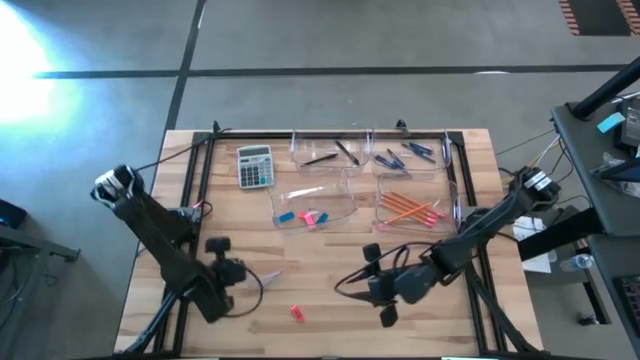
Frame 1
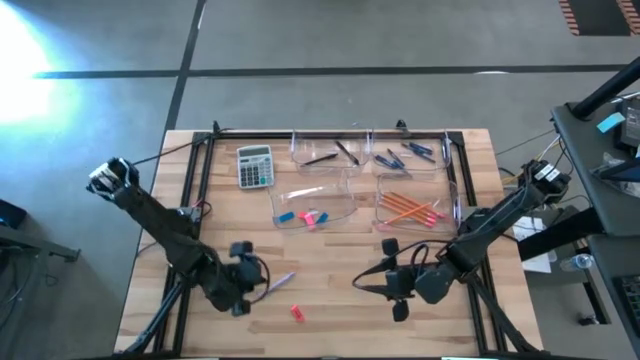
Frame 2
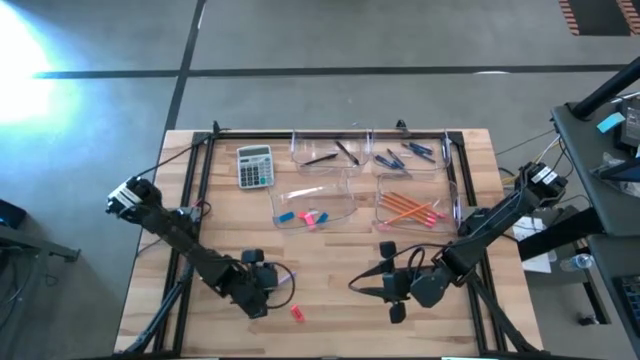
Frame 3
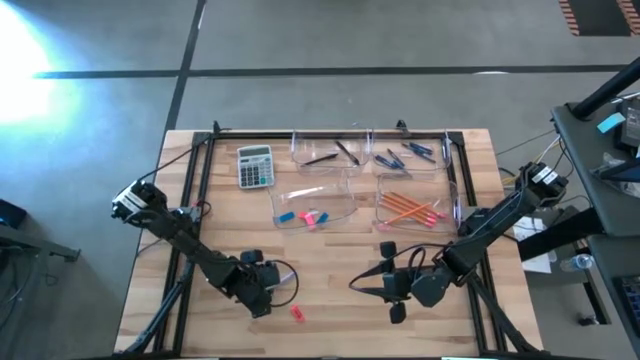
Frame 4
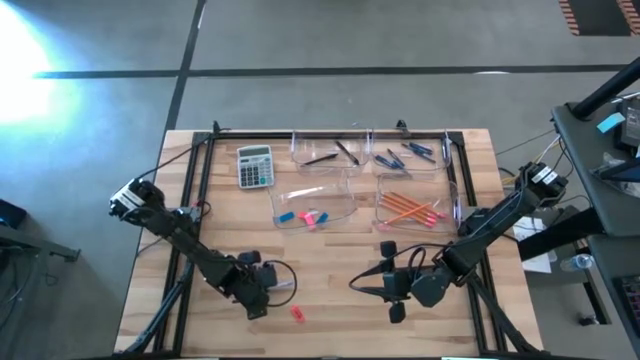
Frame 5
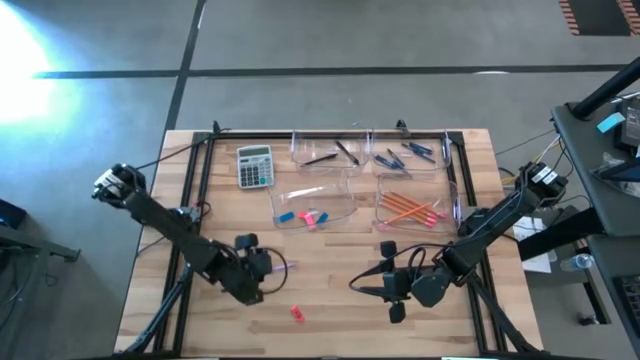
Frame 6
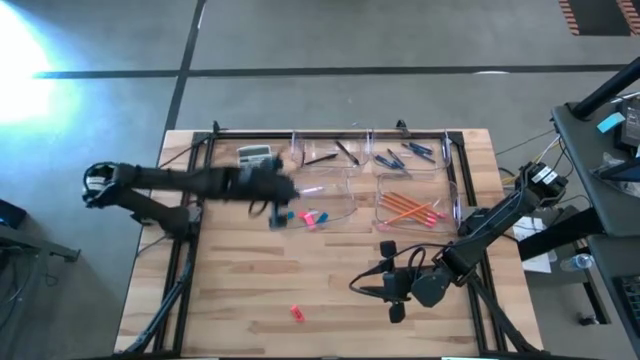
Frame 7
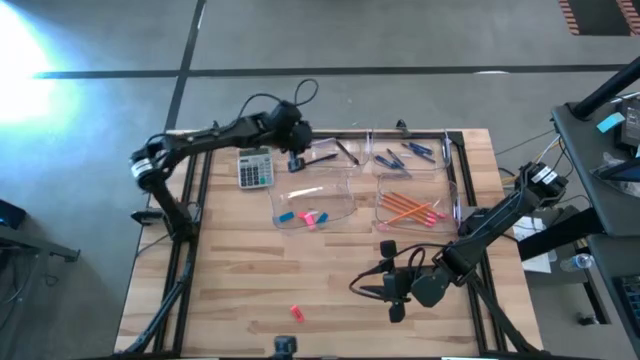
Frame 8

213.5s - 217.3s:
Task: Sort crayons/erasers/pens/pencils in bins
Put the white pen into the top left transparent bin

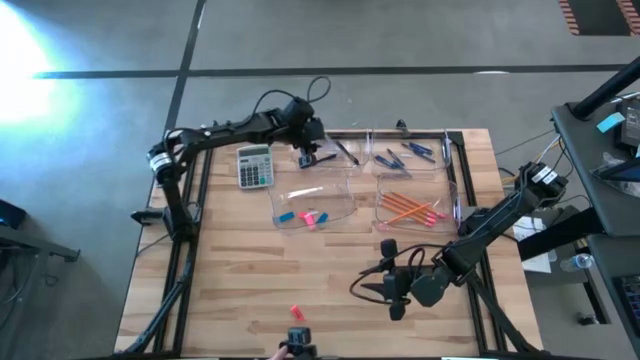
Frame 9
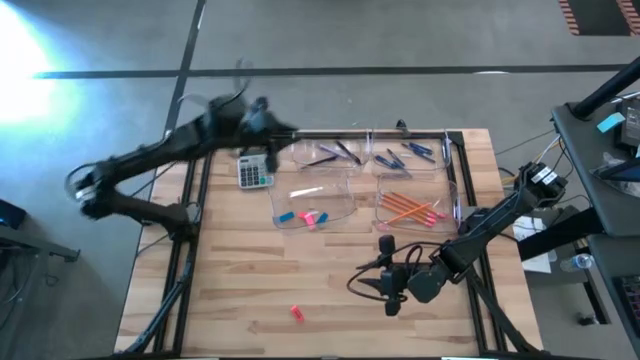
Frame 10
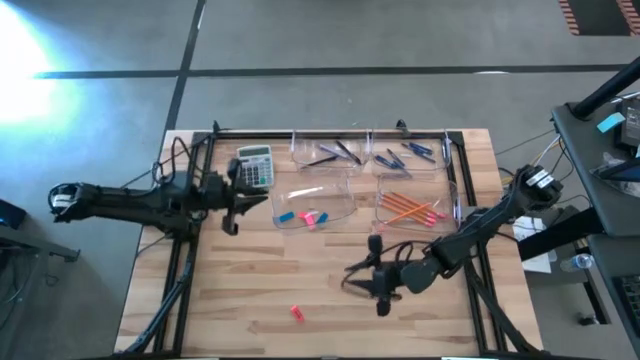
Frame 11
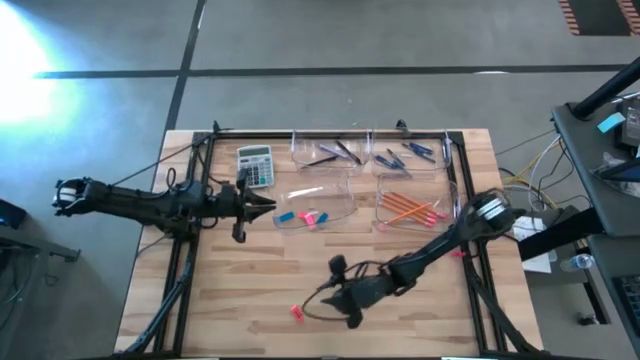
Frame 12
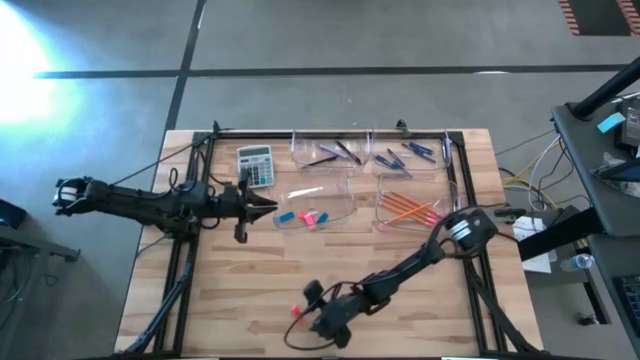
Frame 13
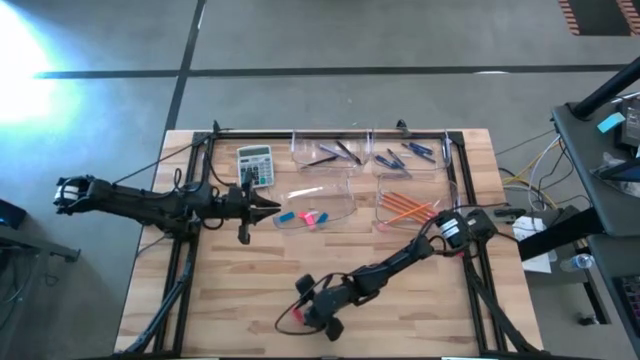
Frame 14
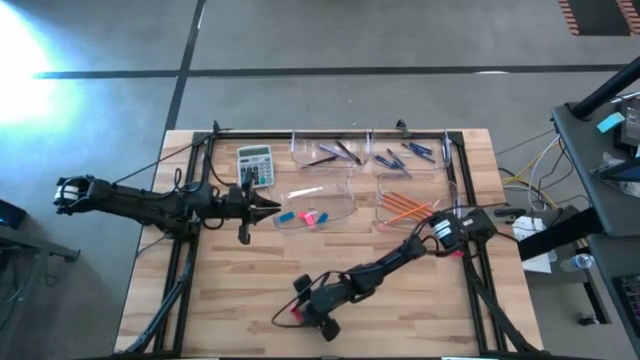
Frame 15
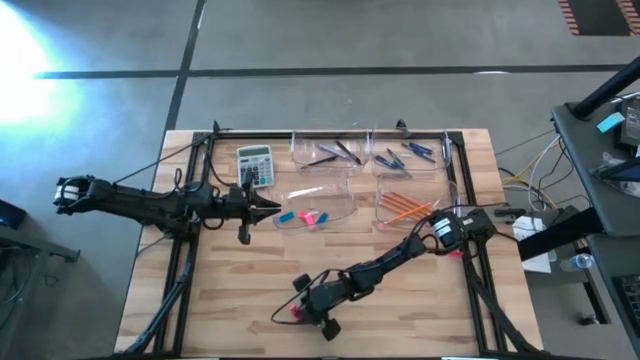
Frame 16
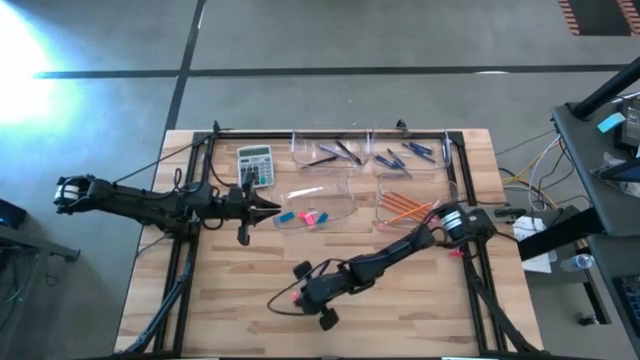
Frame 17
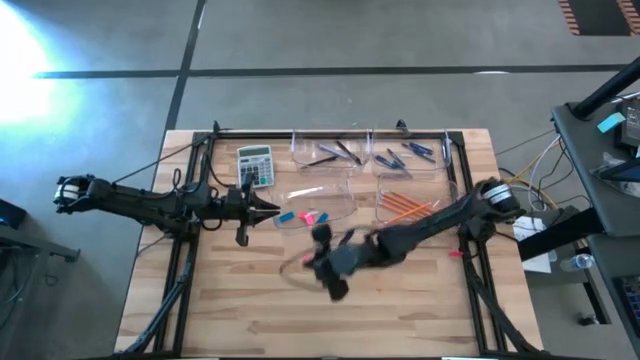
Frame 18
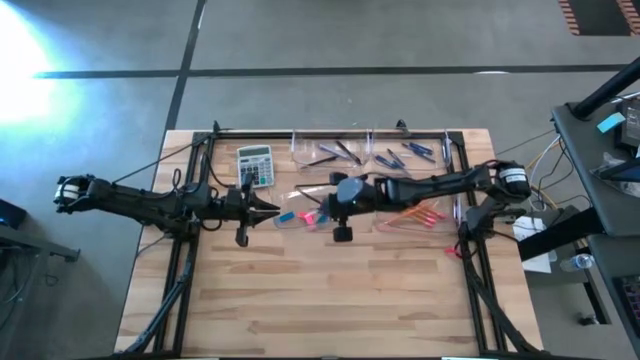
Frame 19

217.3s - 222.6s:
Put the orange eraser into the bottom left transparent bin

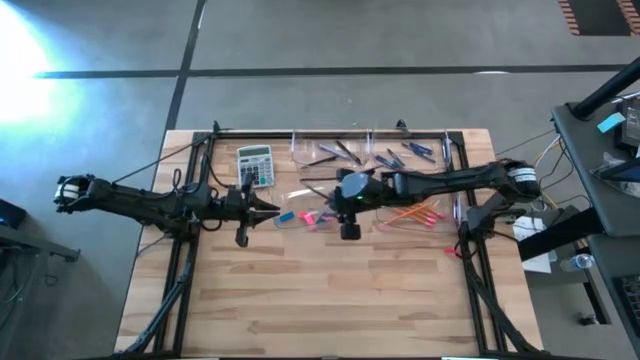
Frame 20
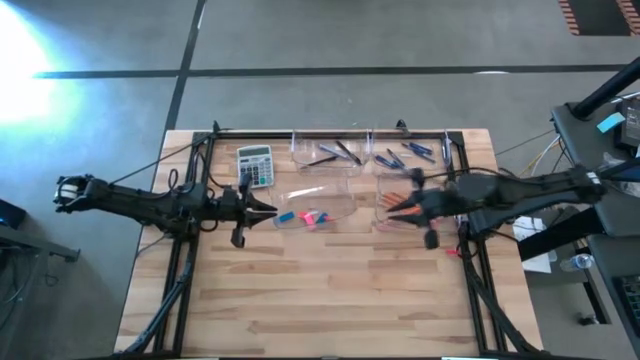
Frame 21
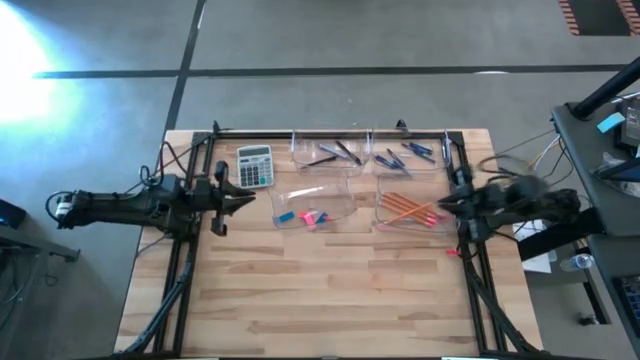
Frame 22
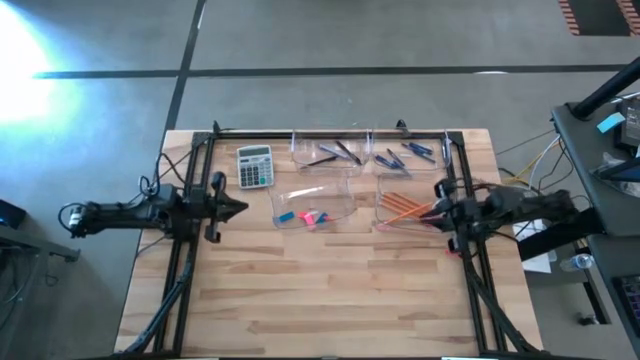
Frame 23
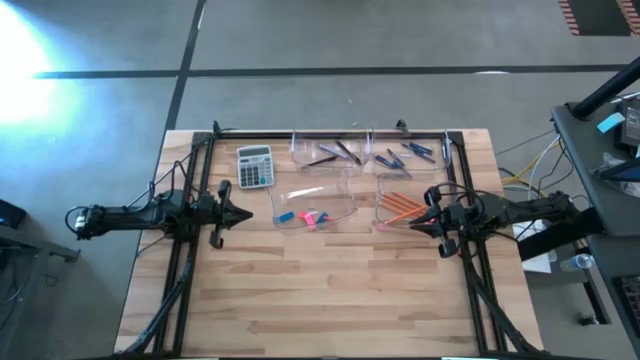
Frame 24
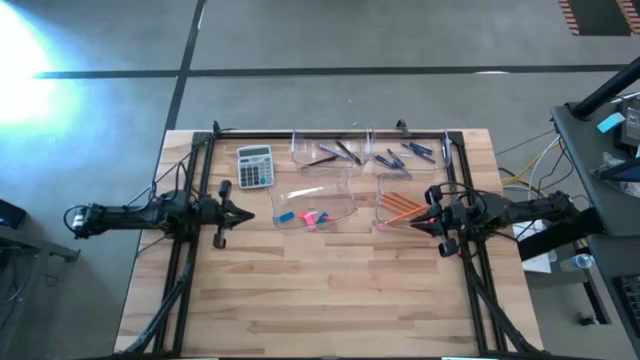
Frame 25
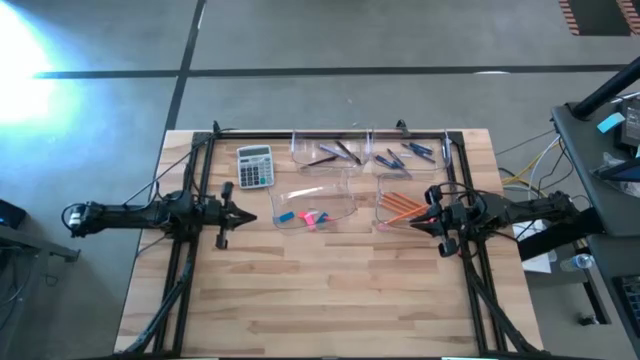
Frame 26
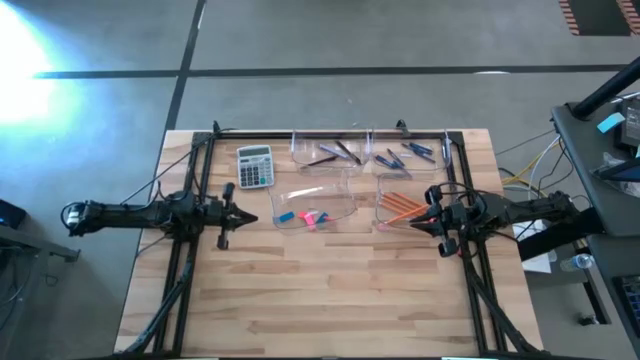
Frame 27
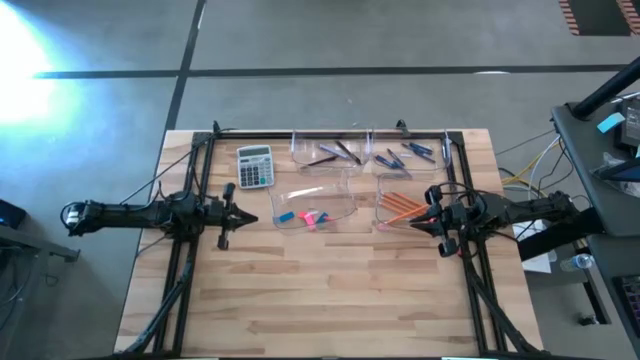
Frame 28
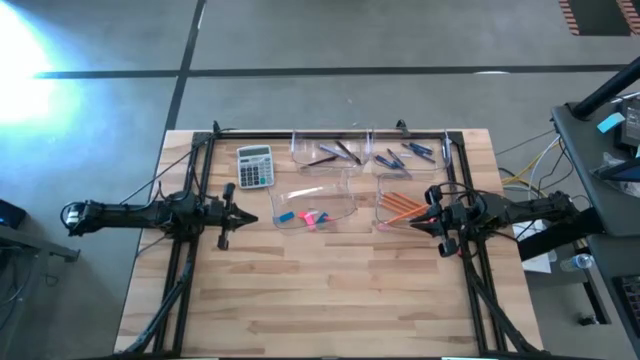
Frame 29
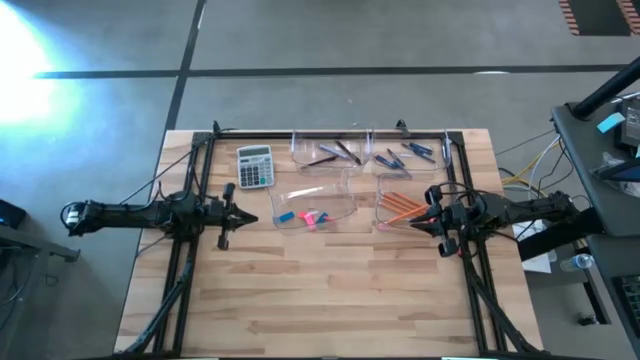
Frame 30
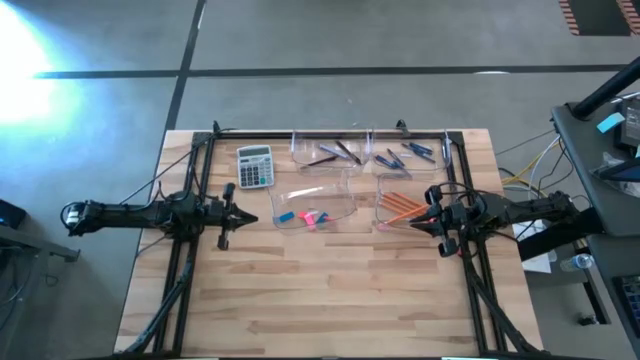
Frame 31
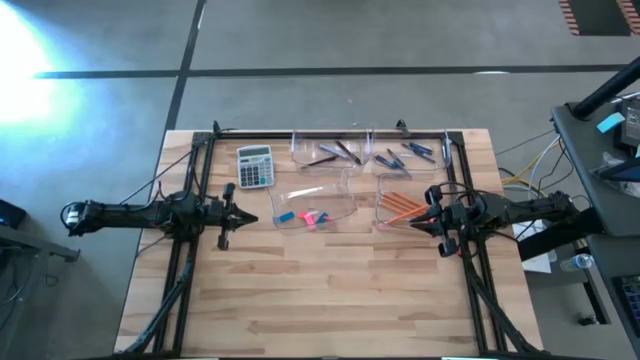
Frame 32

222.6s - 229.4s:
Return to Home Position

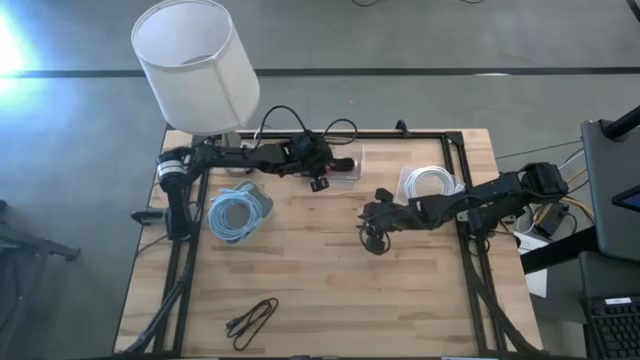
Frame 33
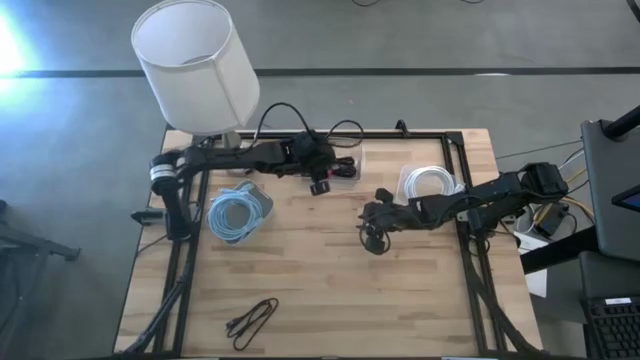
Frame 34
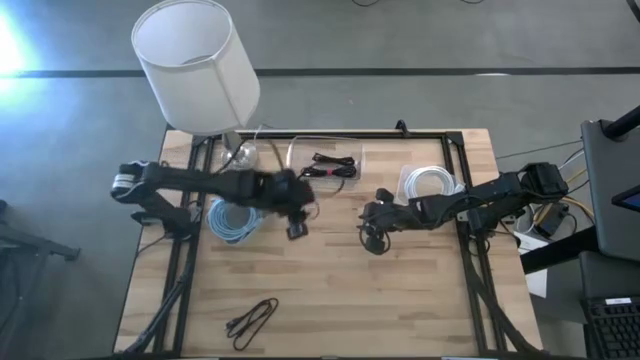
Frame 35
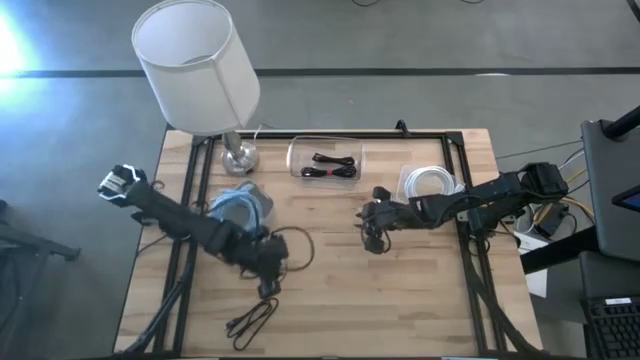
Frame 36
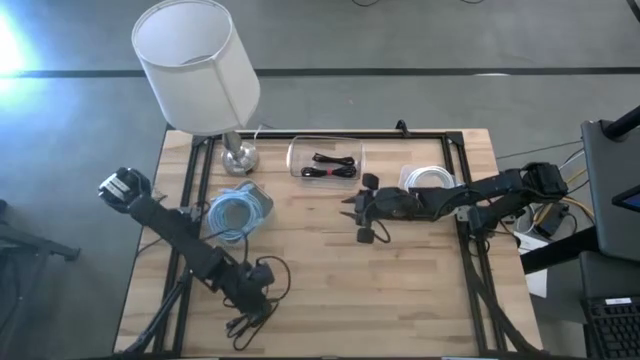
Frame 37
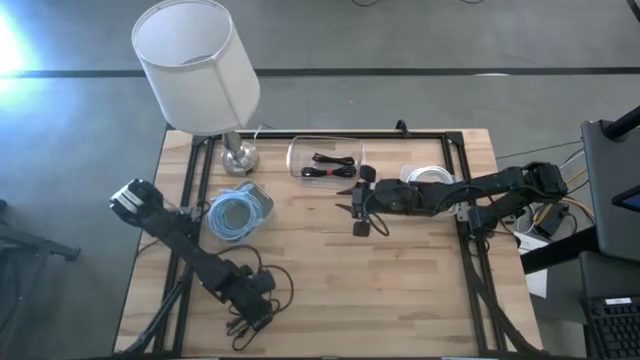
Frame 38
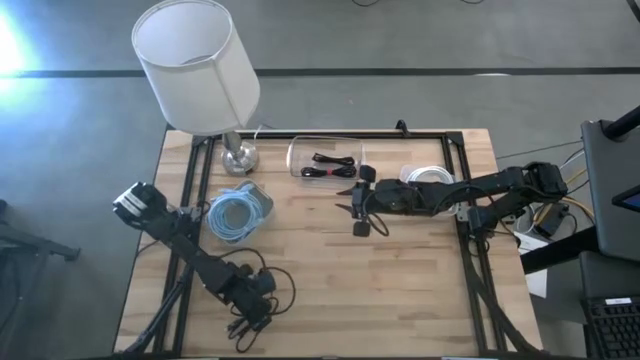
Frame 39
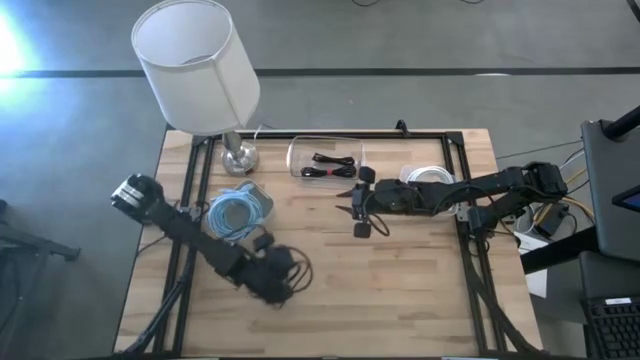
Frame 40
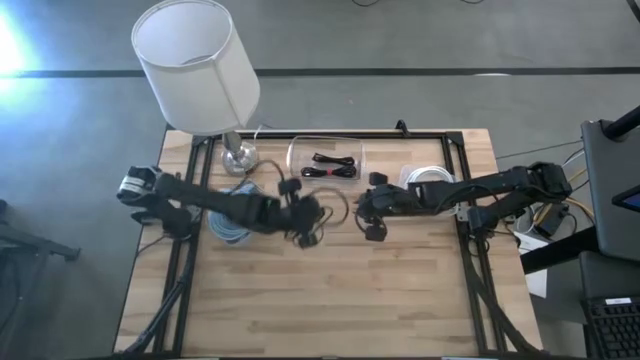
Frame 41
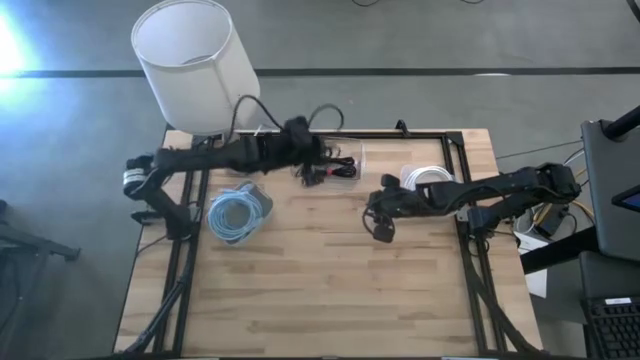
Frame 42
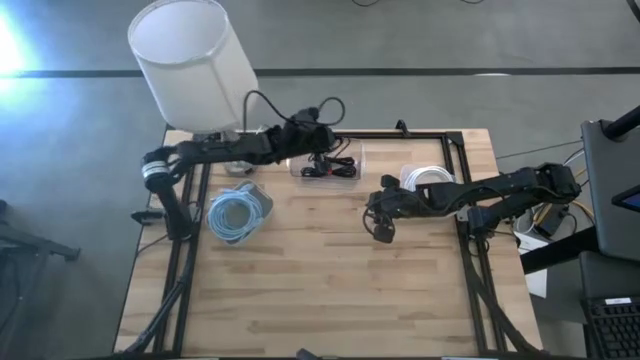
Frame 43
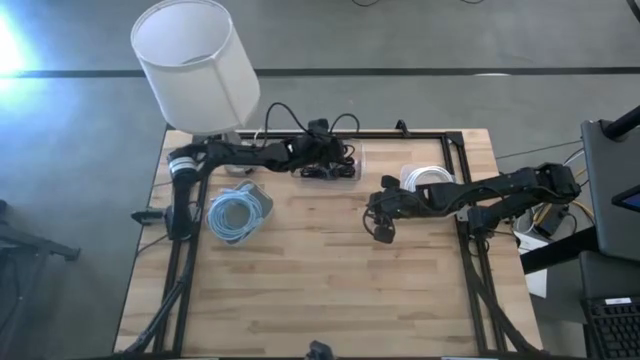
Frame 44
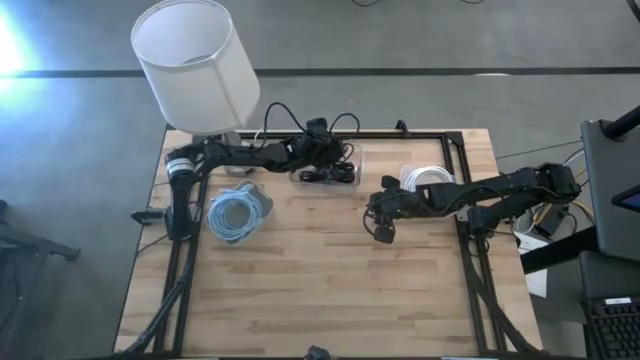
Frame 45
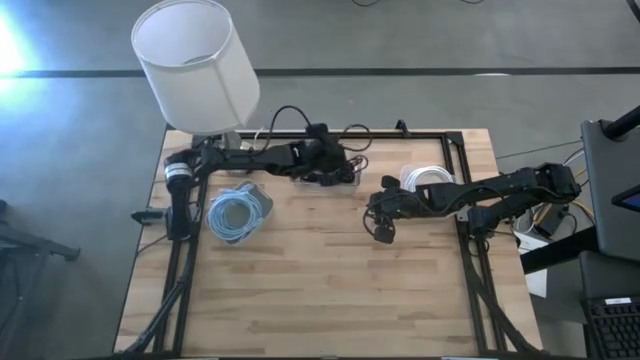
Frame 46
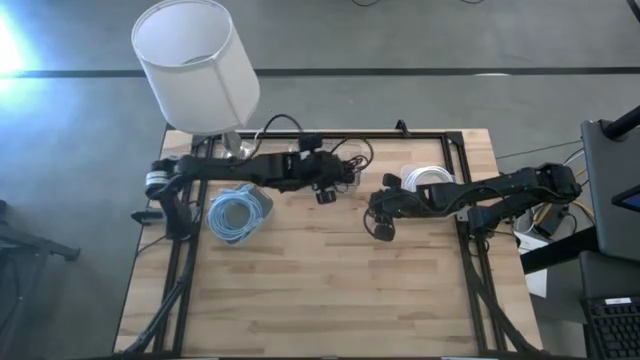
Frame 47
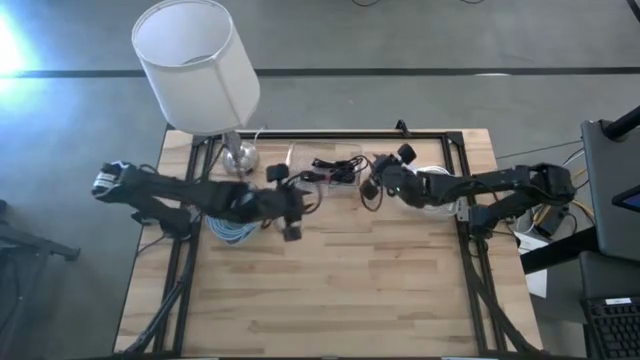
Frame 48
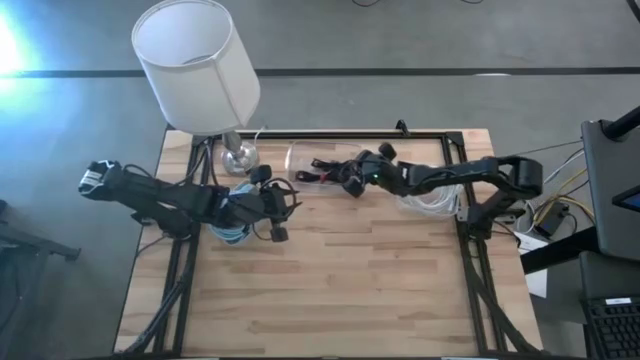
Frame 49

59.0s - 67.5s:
Task: Pick & Place USB Port
Put the black USB cable into the left transparent bin
